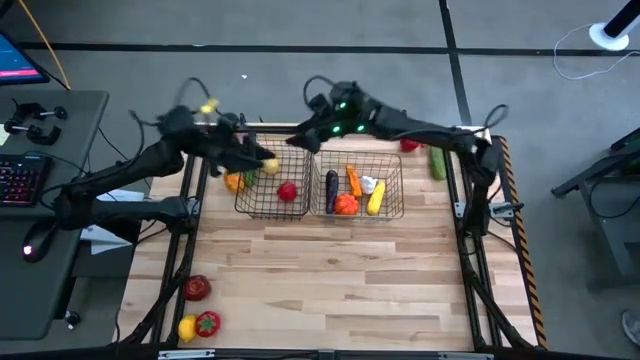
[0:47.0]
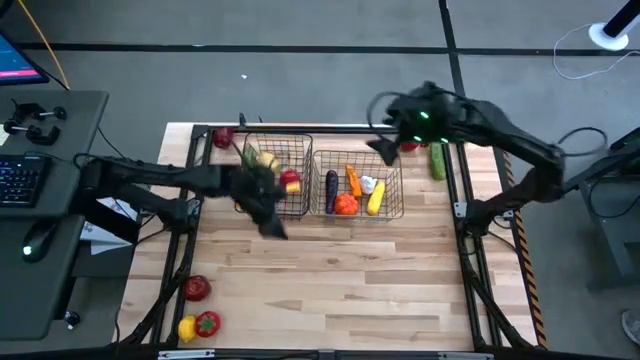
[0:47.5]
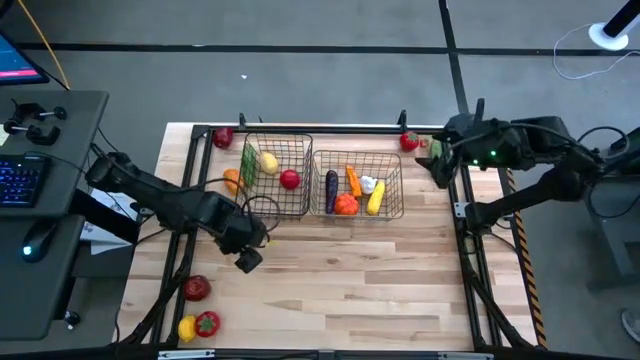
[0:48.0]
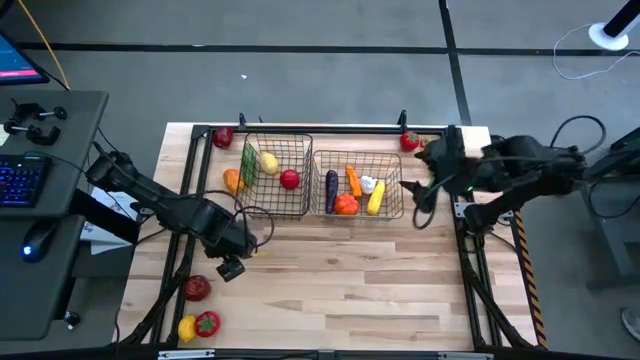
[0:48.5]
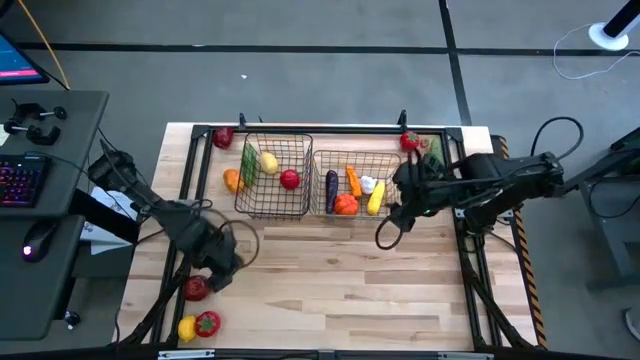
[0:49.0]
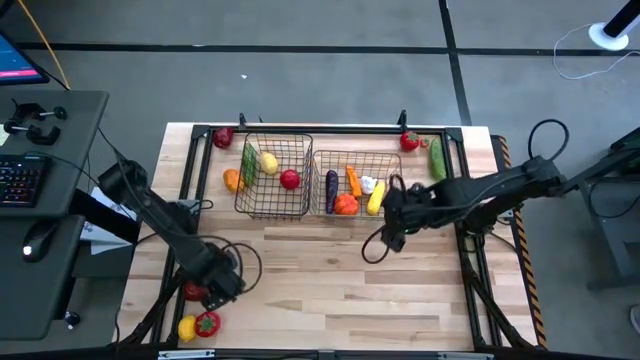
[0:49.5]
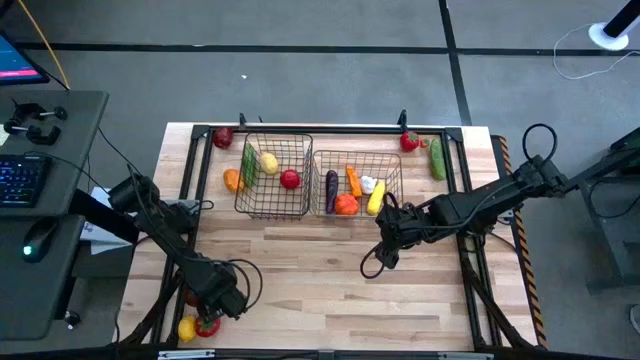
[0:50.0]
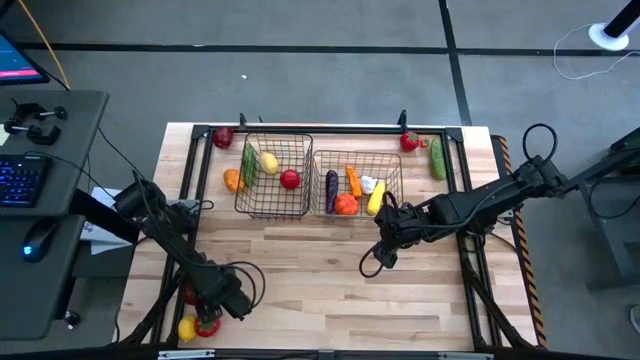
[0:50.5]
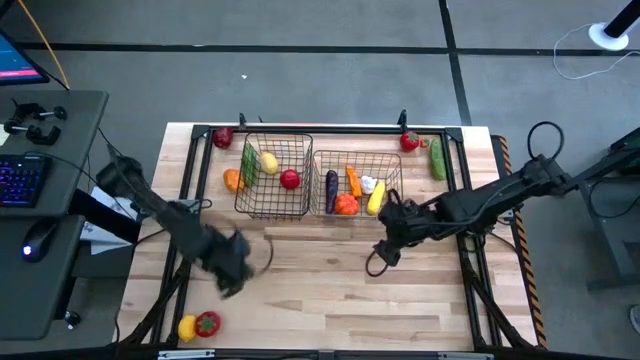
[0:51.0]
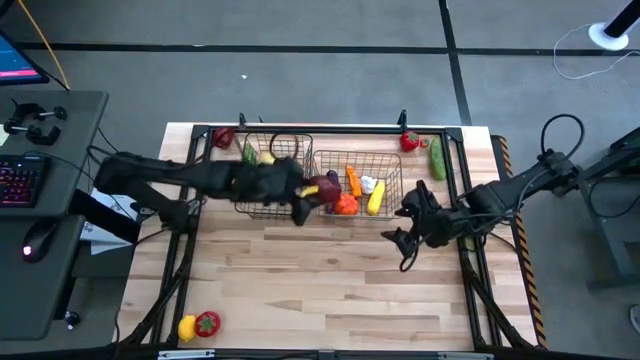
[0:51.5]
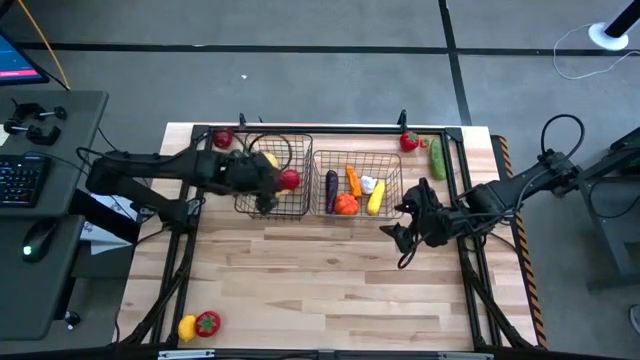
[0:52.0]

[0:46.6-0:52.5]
Task: Sort produce into baskets
Put the bottom red apple into the left wire basket

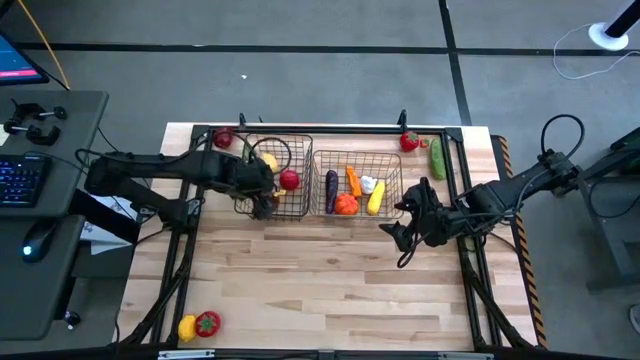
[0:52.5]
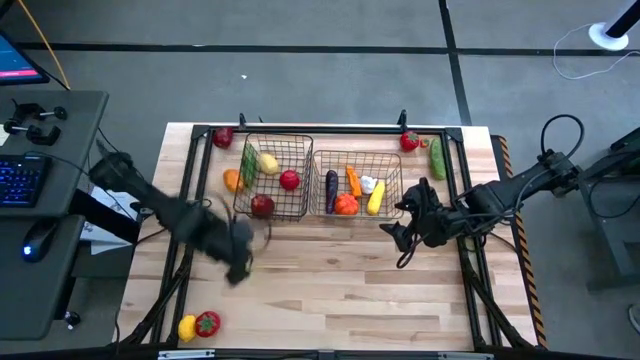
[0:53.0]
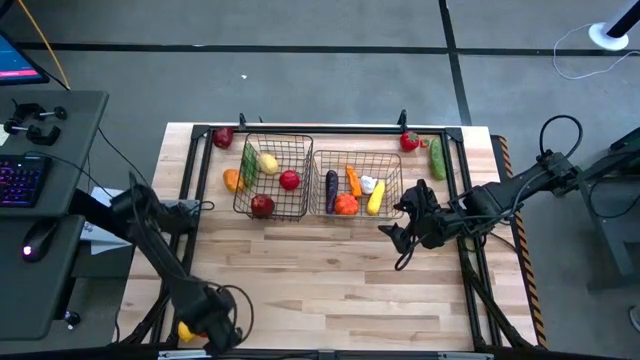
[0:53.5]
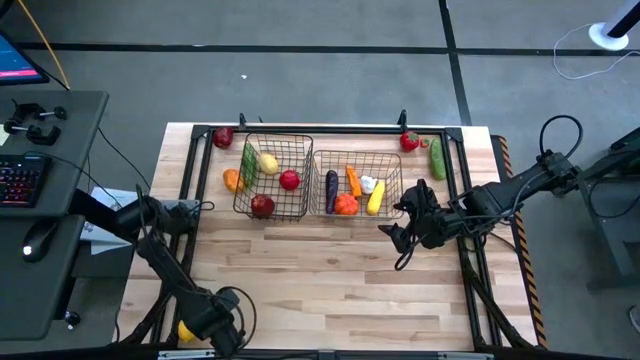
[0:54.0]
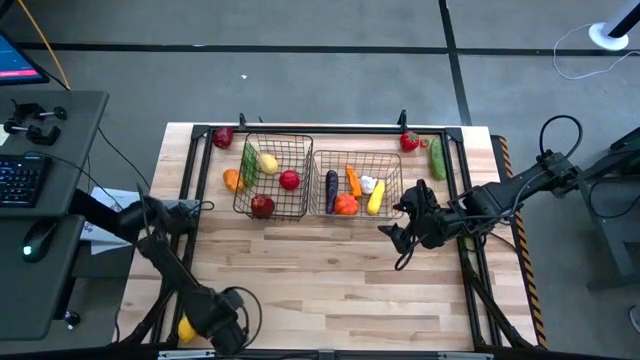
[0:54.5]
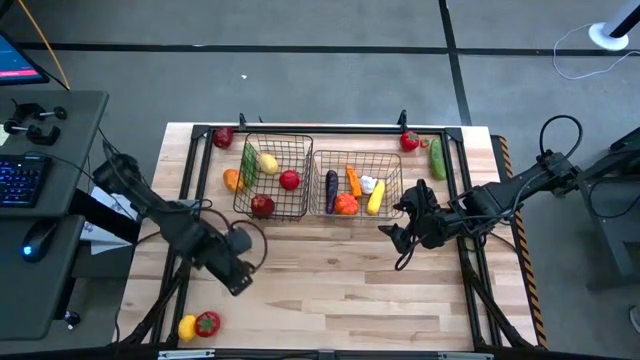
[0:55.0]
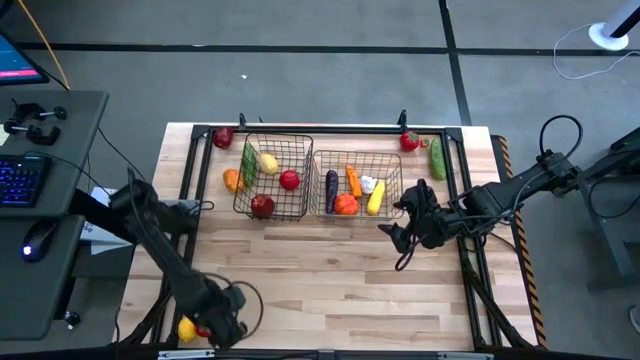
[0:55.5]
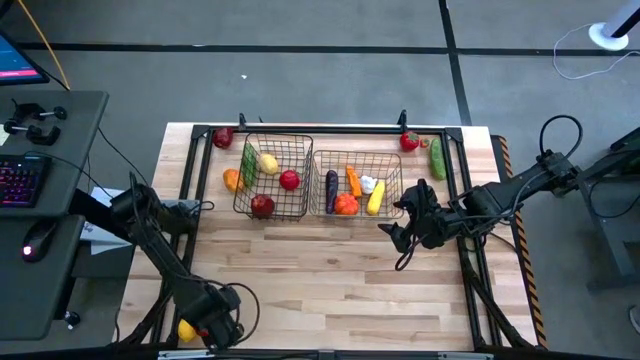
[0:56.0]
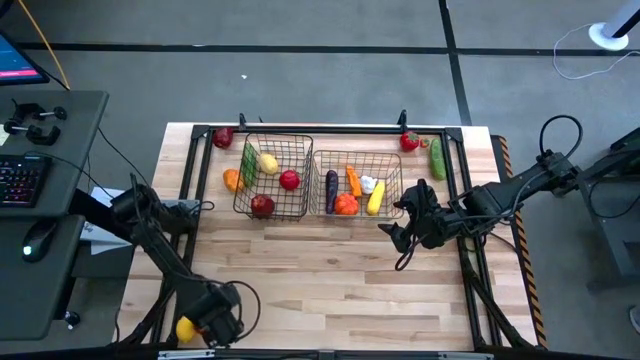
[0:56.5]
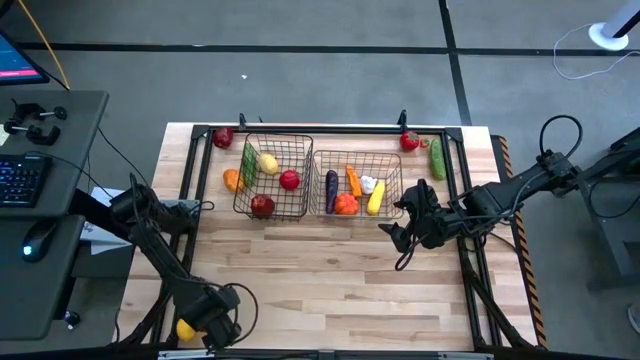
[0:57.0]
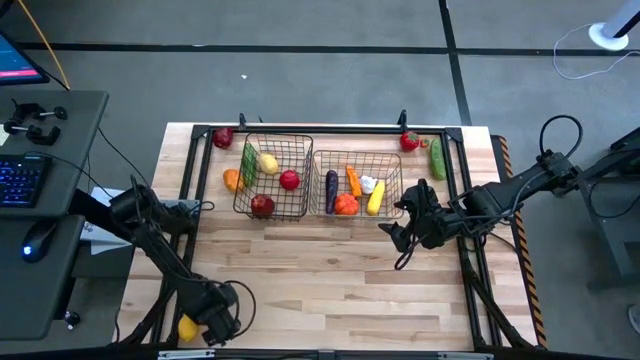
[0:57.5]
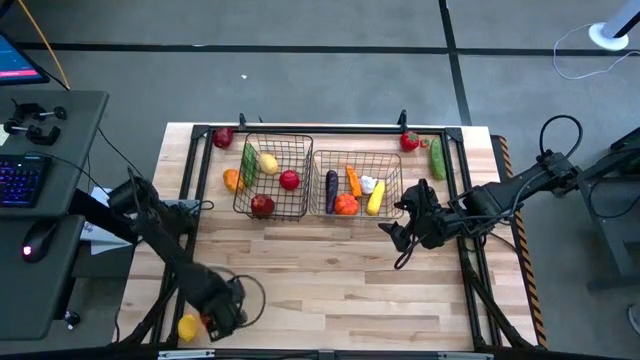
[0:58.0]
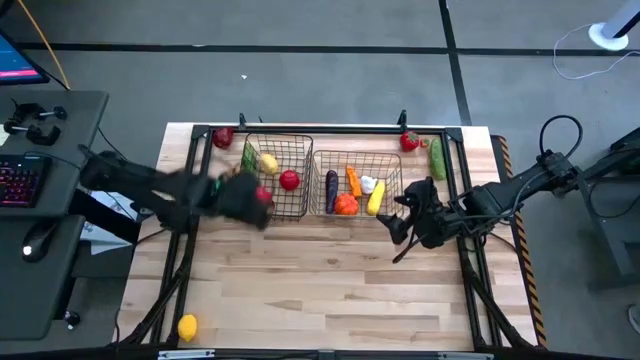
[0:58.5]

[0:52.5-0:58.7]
Put the bottom left tomato into the left wire basket

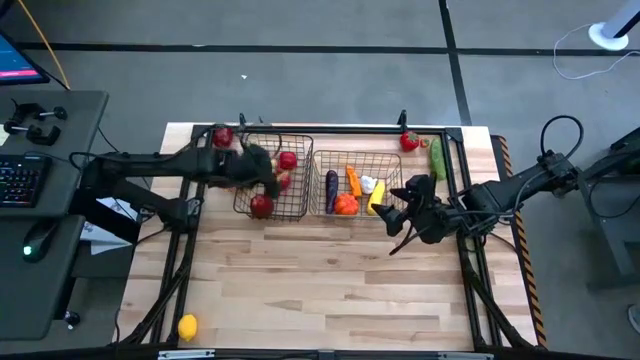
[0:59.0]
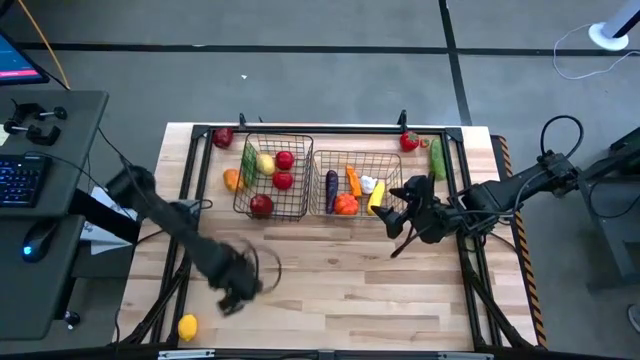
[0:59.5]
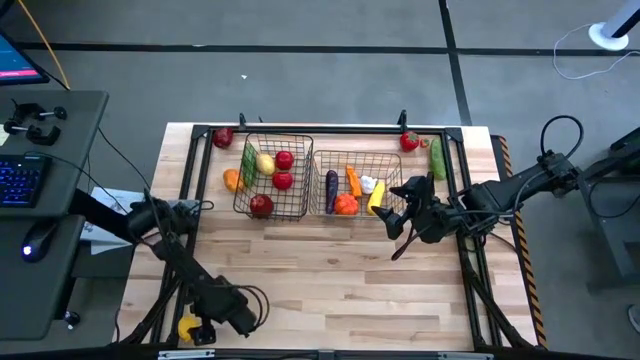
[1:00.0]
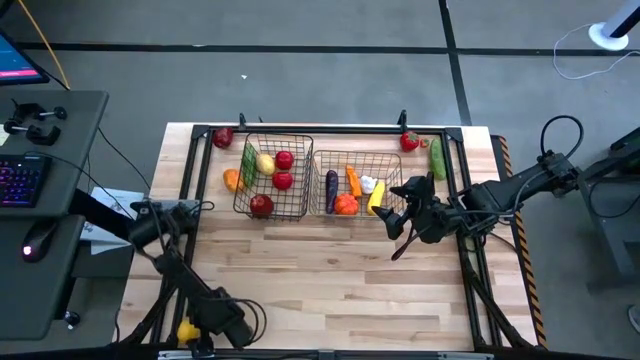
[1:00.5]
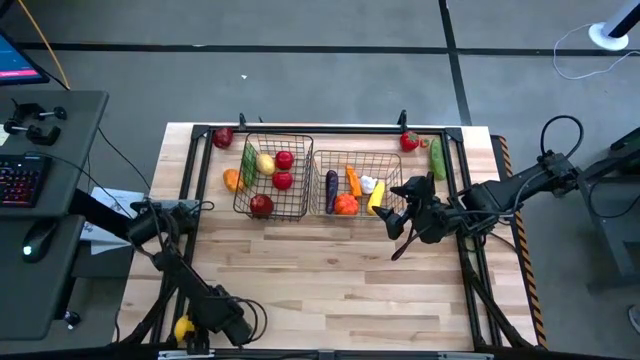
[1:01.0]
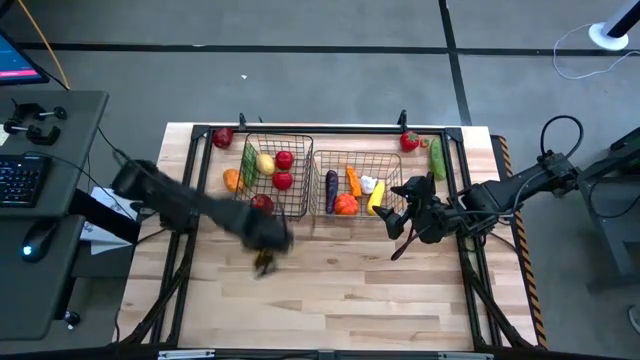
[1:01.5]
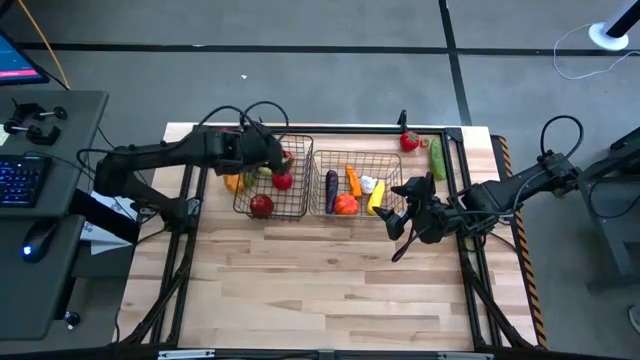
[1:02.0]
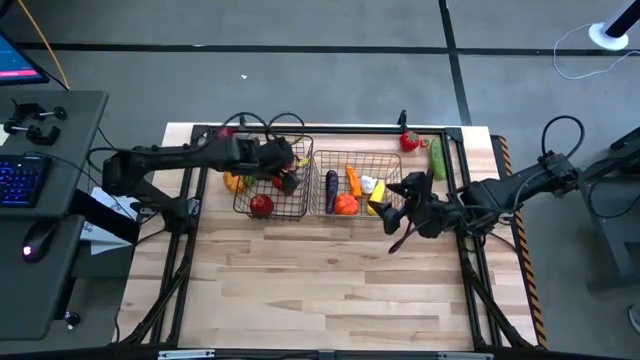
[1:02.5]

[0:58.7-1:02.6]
Put the lemon into the left wire basket

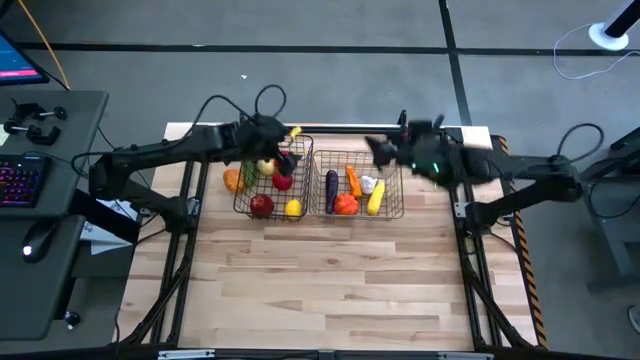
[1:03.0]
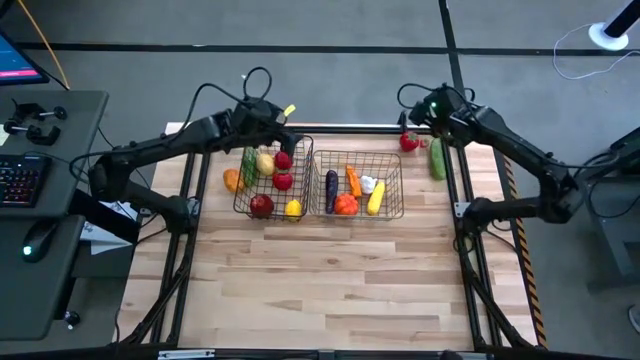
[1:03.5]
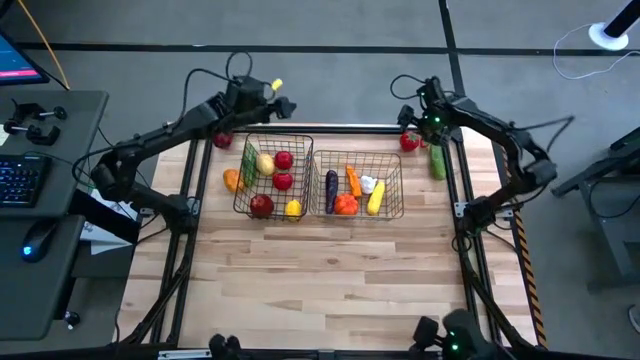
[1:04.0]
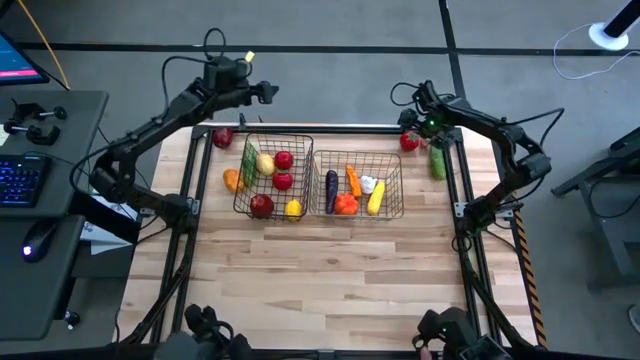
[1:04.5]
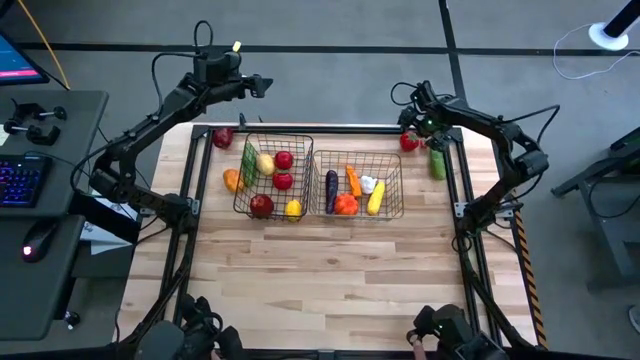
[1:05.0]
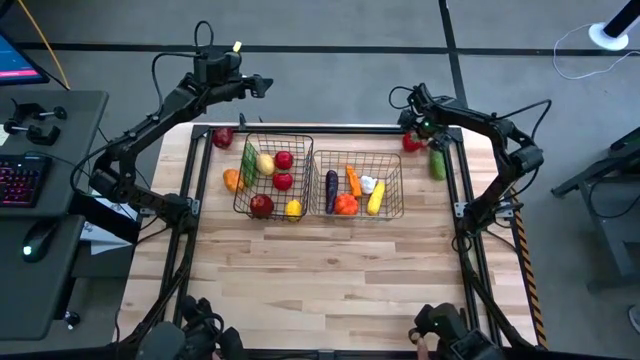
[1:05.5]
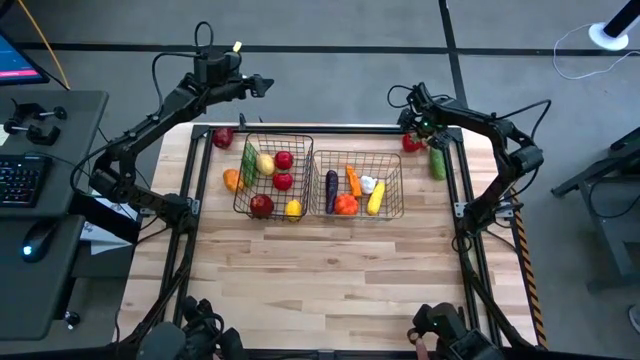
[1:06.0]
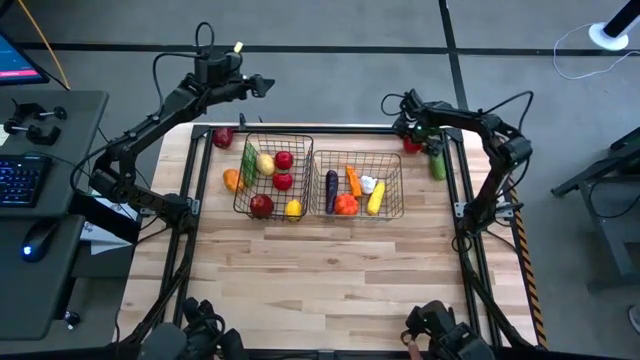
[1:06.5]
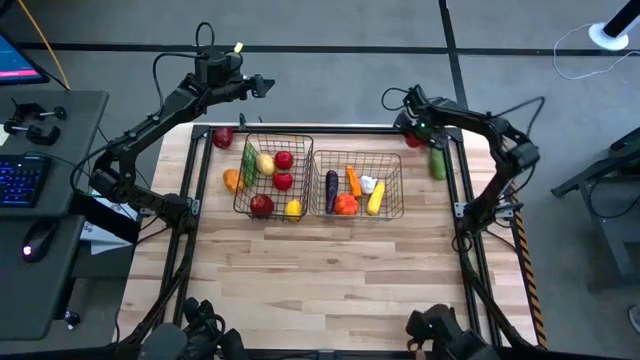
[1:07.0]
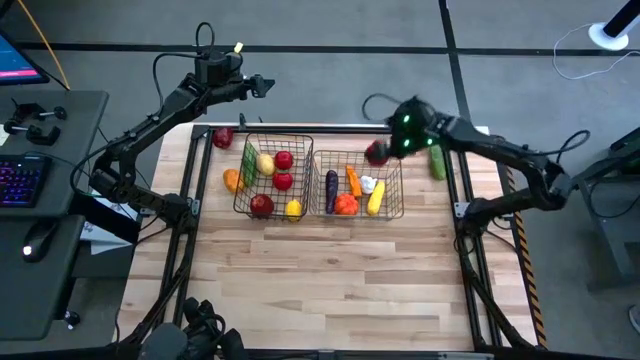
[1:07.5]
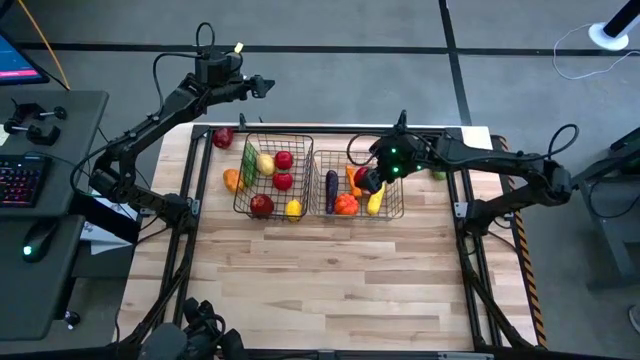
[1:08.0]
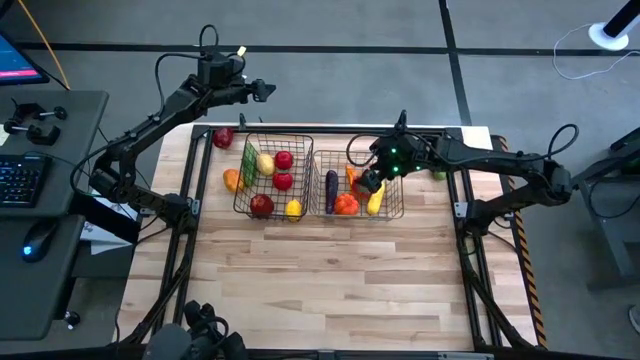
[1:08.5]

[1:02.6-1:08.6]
Put the tomato into the right wire basket
